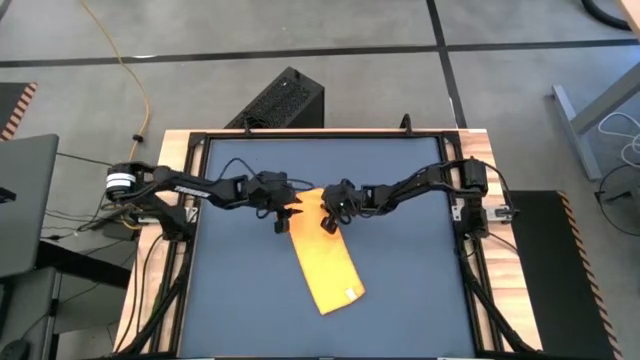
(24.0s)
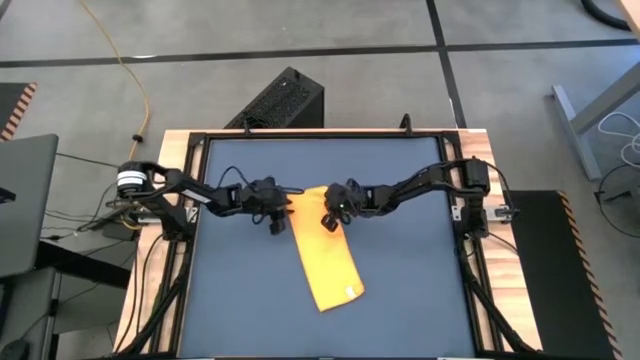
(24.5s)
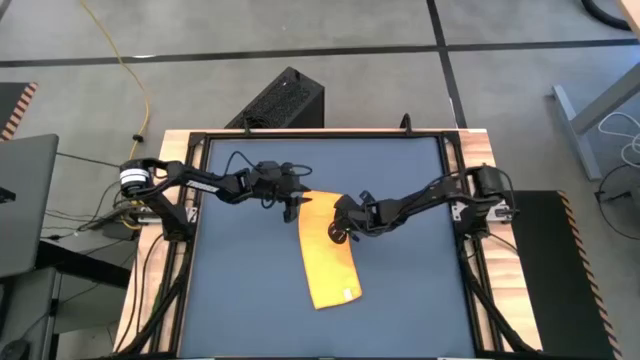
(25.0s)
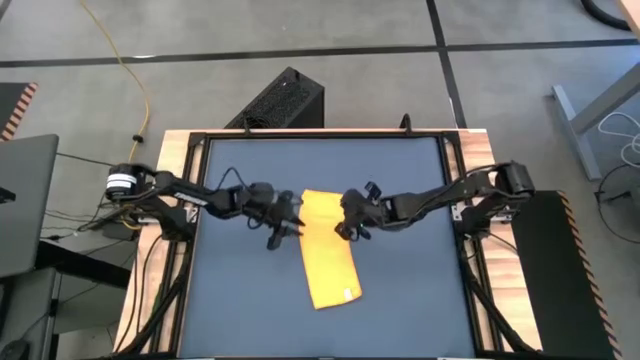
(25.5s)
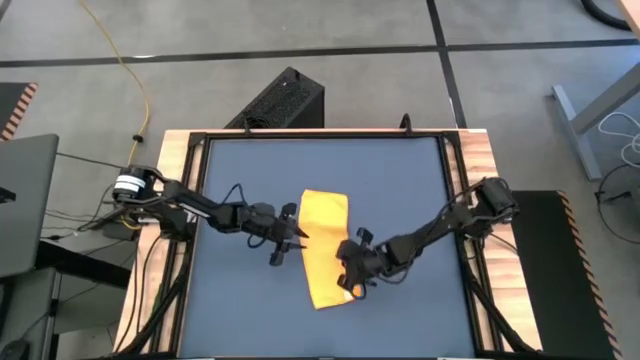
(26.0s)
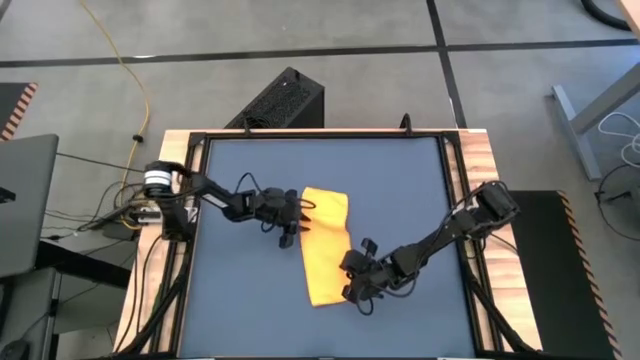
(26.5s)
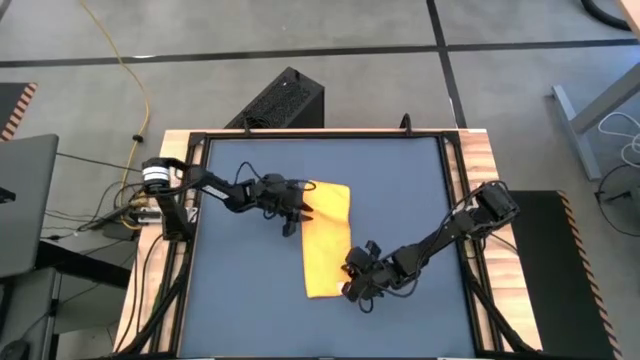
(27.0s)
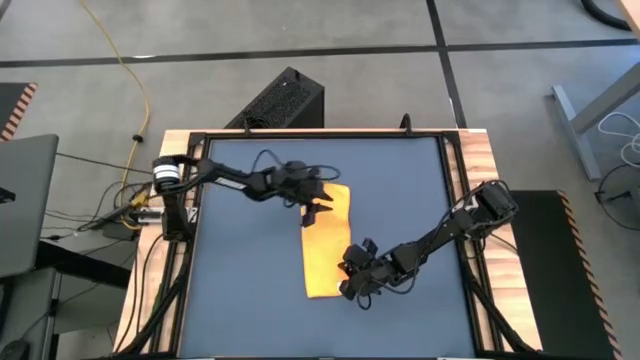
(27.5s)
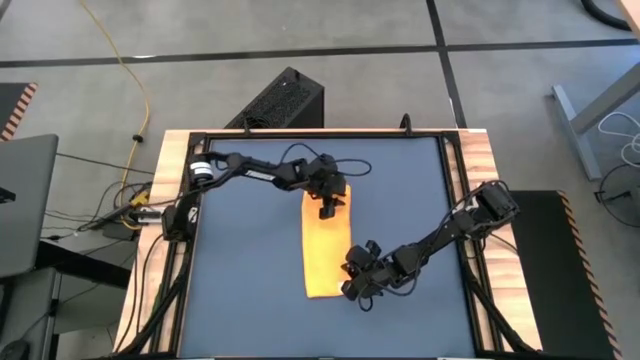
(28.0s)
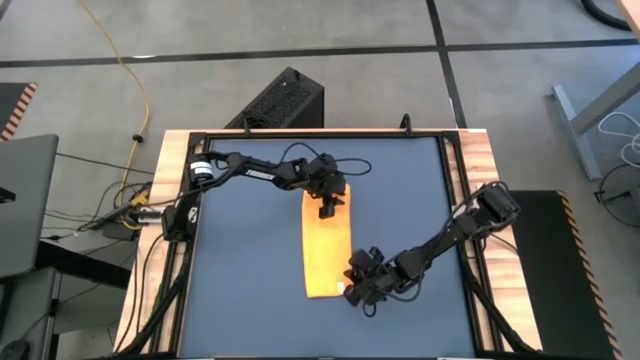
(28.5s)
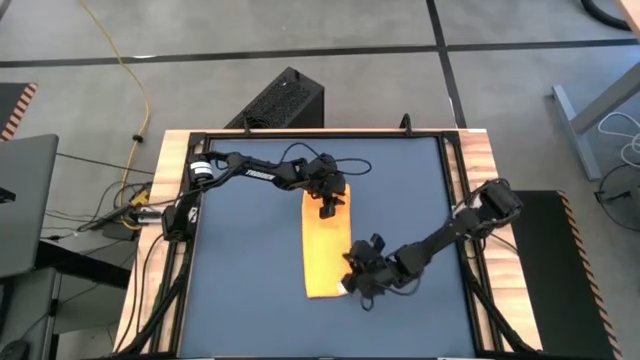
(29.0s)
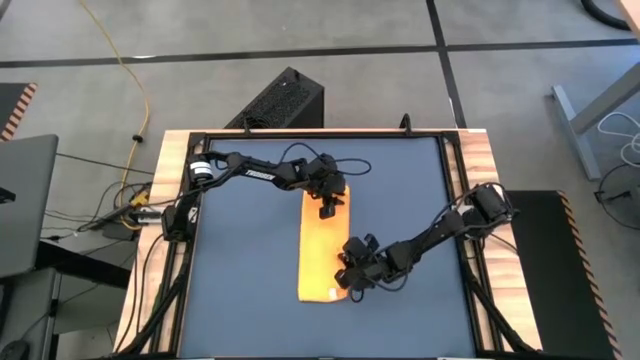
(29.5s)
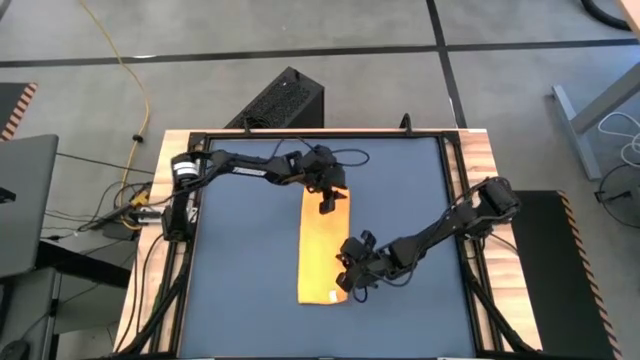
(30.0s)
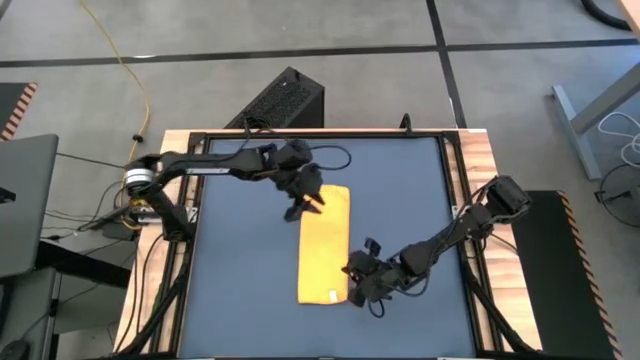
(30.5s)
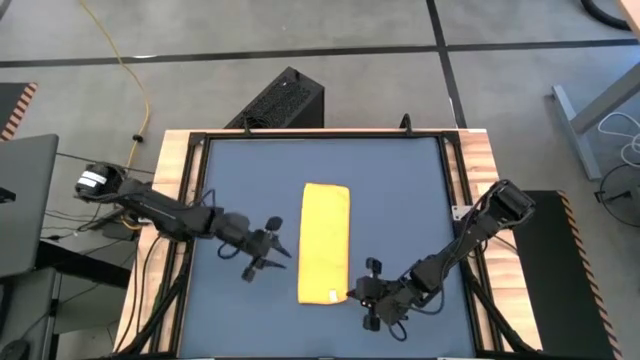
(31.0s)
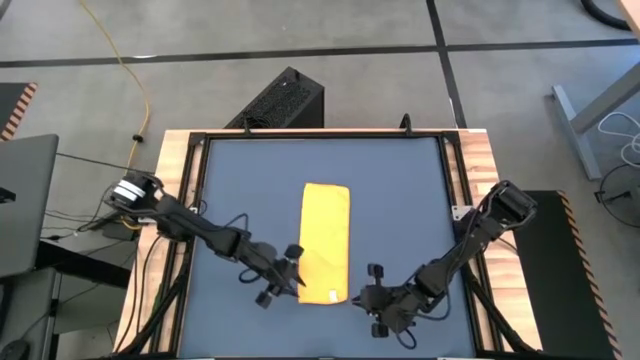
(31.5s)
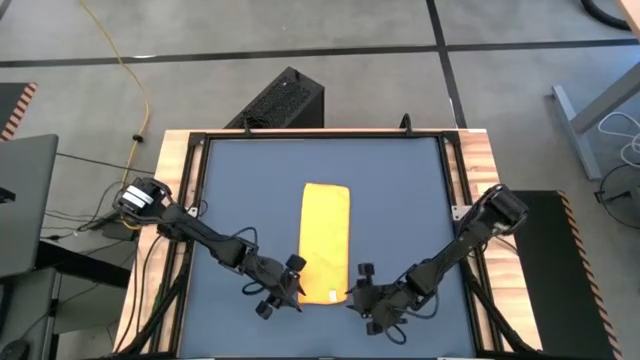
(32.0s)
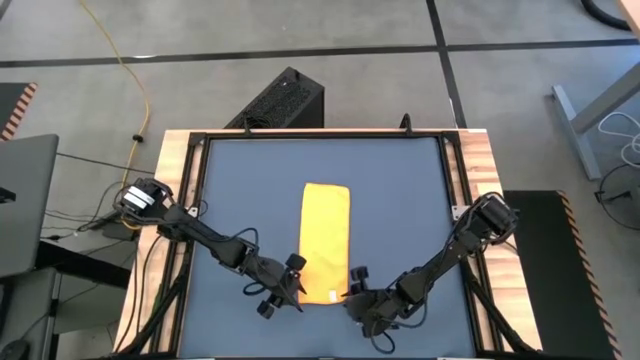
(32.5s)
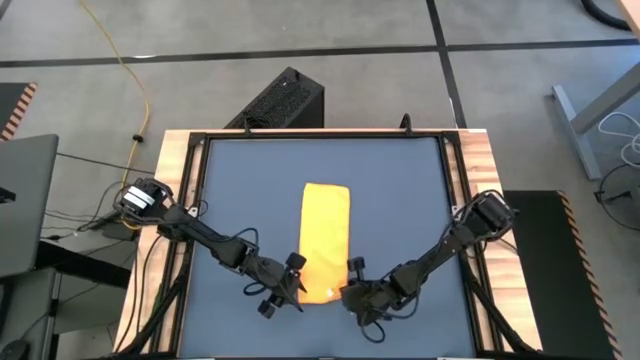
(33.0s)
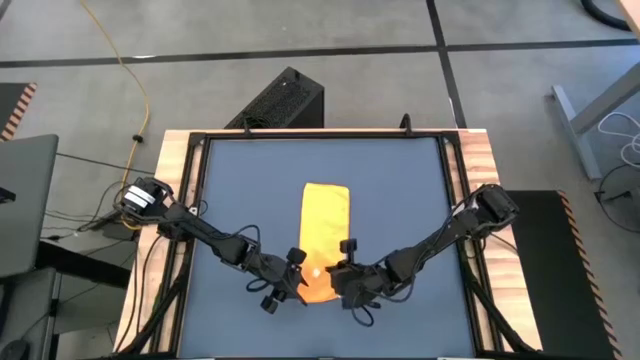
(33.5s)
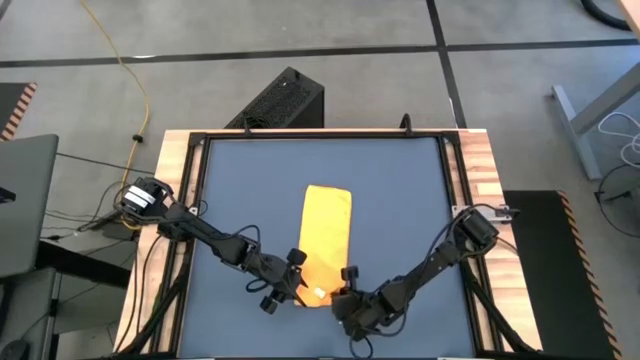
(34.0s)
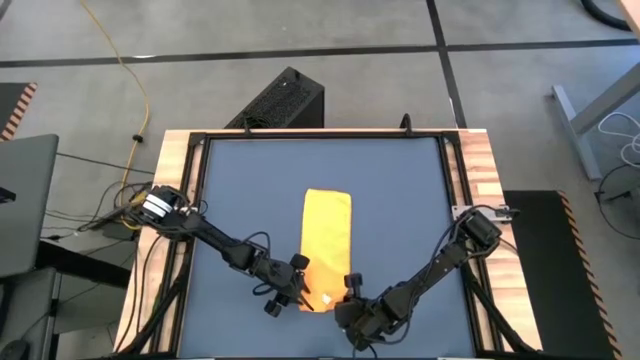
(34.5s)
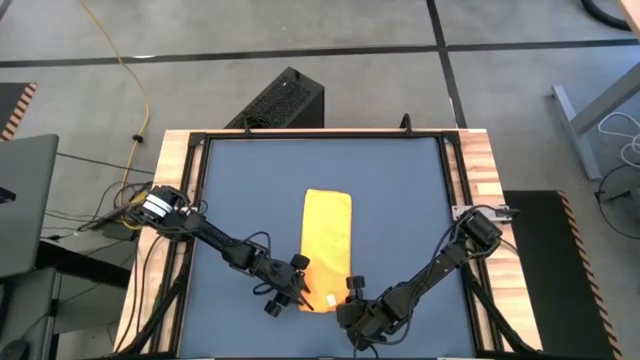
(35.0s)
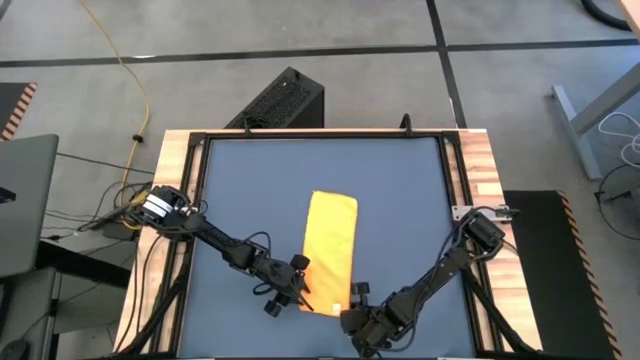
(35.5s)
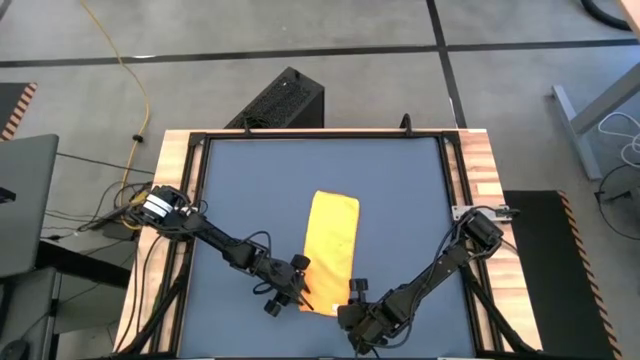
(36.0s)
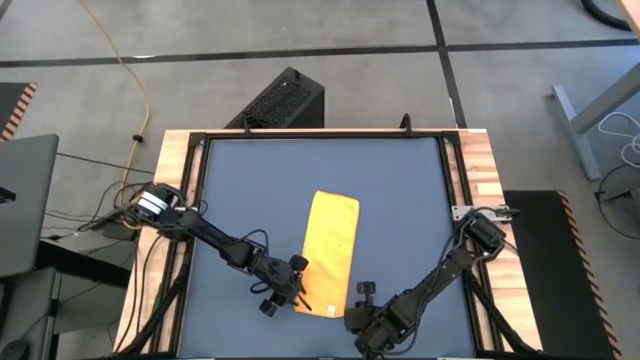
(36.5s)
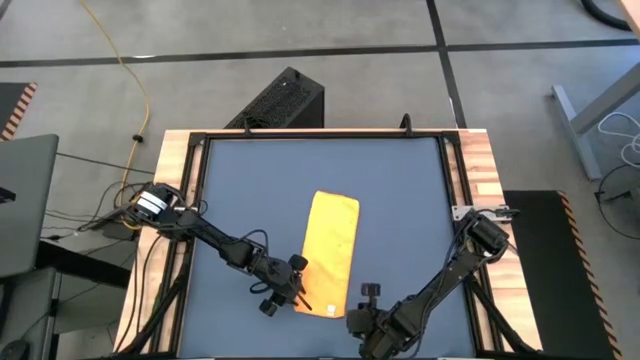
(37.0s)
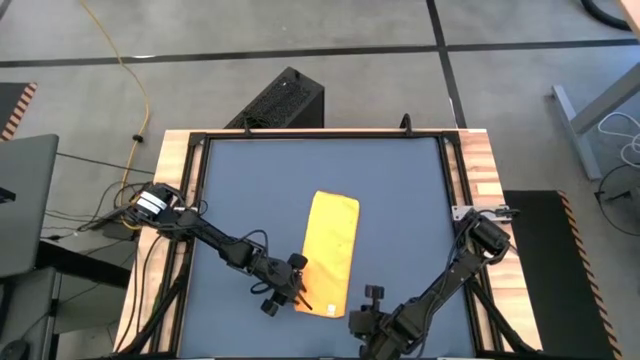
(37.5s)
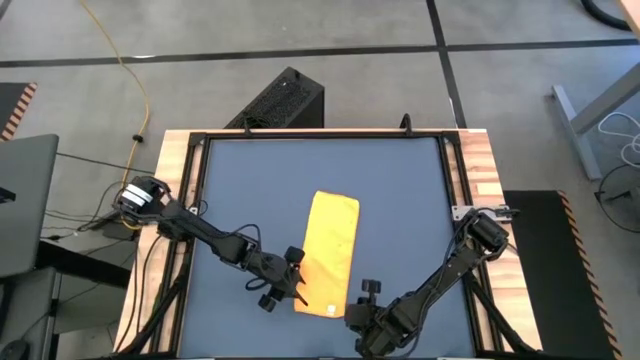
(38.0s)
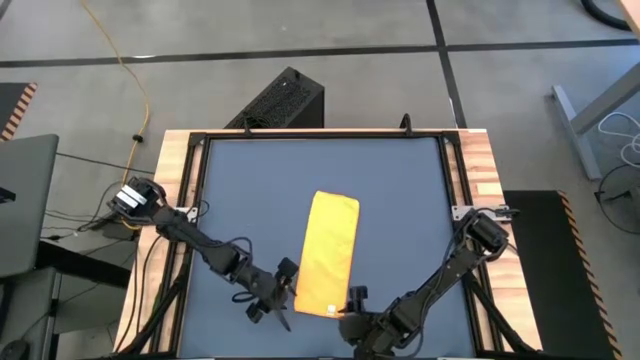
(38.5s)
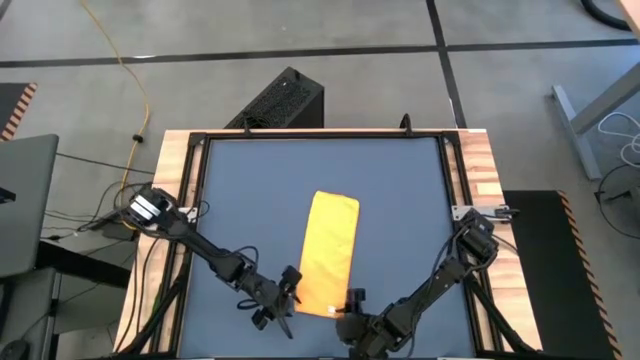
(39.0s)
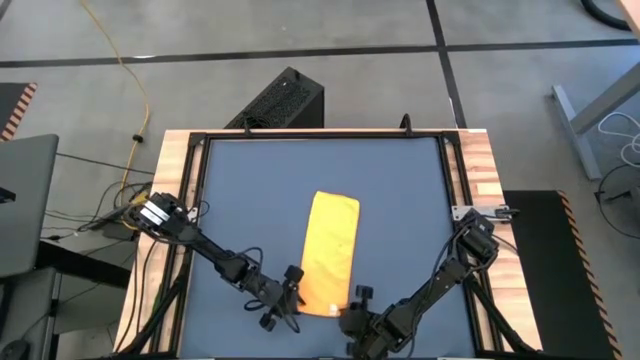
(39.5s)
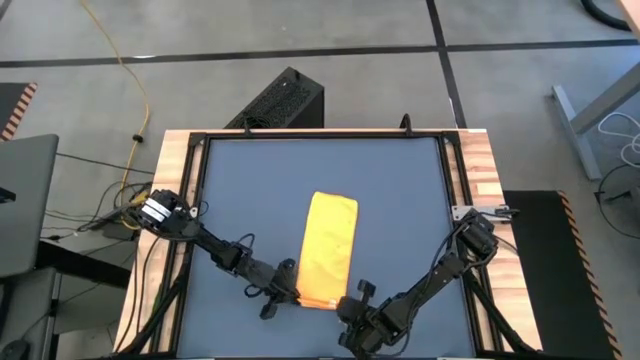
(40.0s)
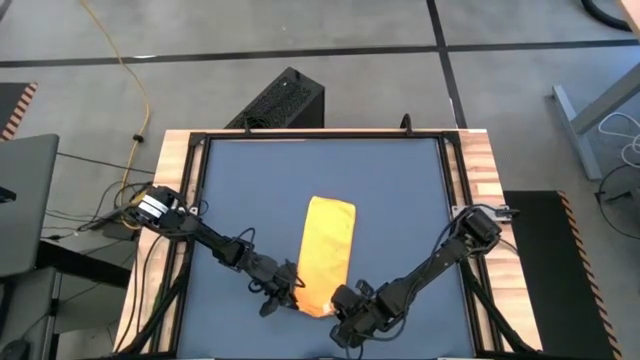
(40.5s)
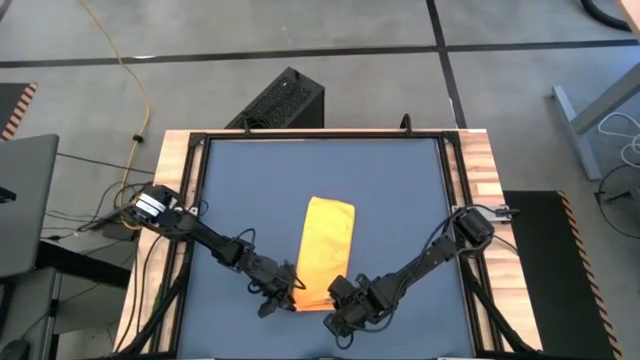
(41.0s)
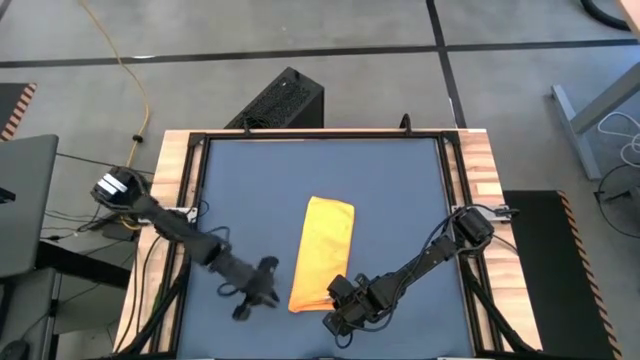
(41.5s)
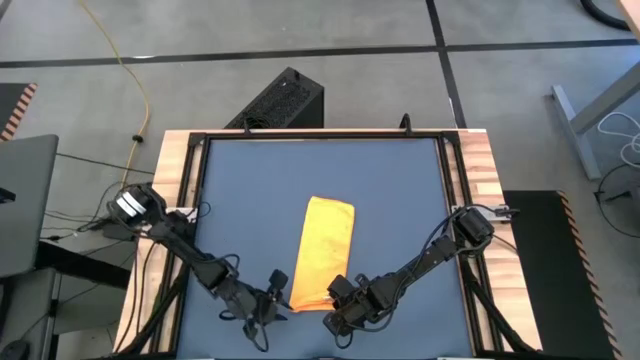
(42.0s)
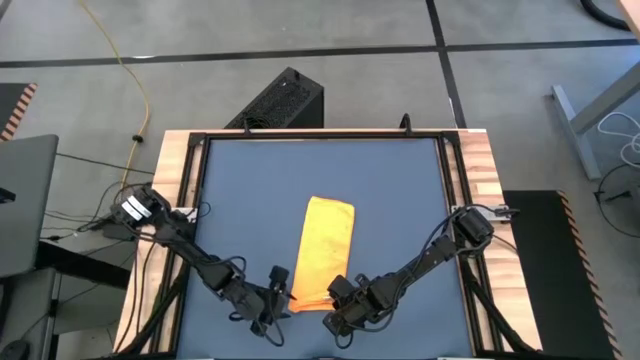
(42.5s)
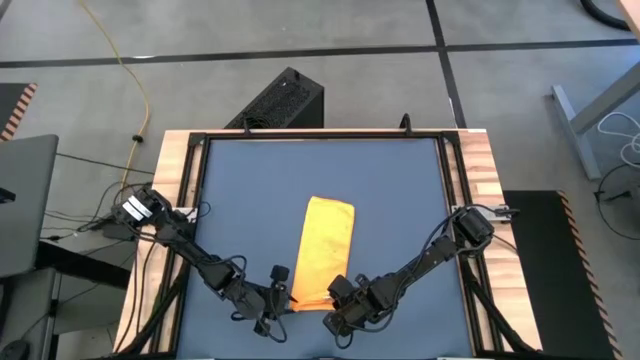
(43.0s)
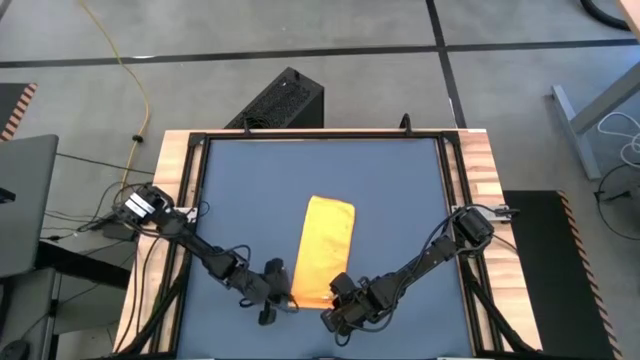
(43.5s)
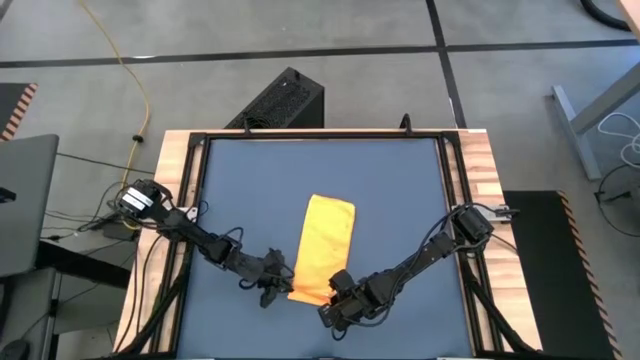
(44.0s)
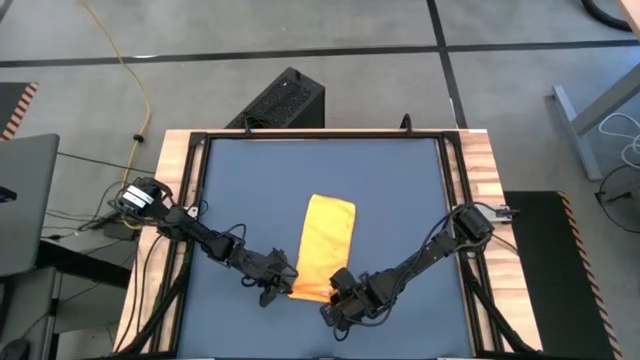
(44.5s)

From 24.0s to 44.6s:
Task: Roll towel into tight, uniform cylinder
Roll the orange microfiber cloth
